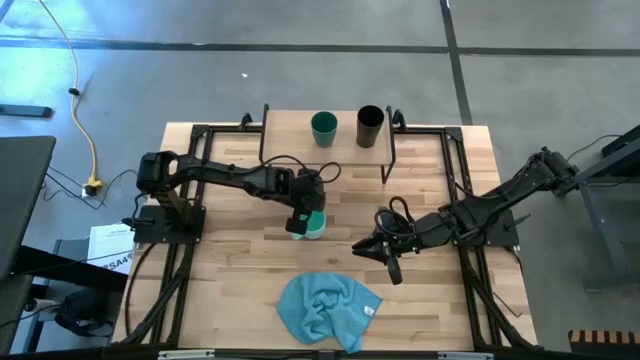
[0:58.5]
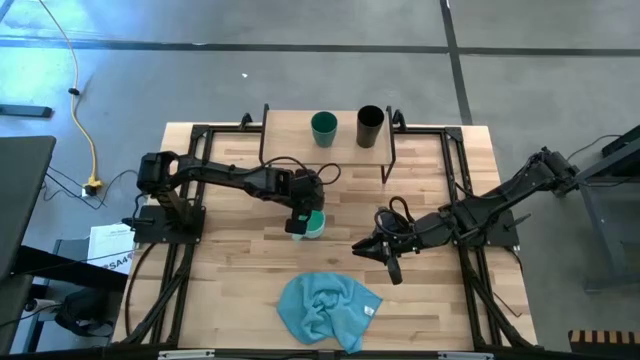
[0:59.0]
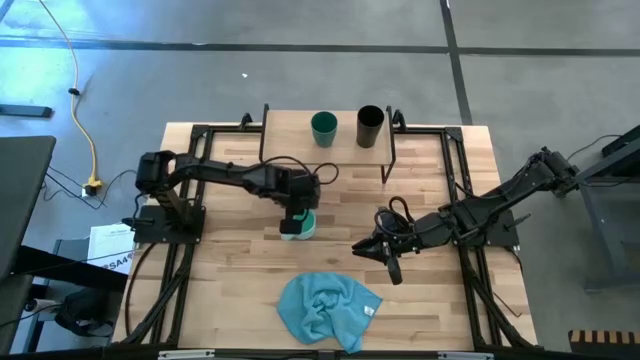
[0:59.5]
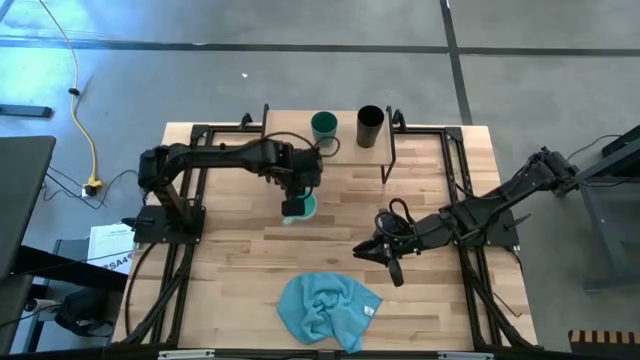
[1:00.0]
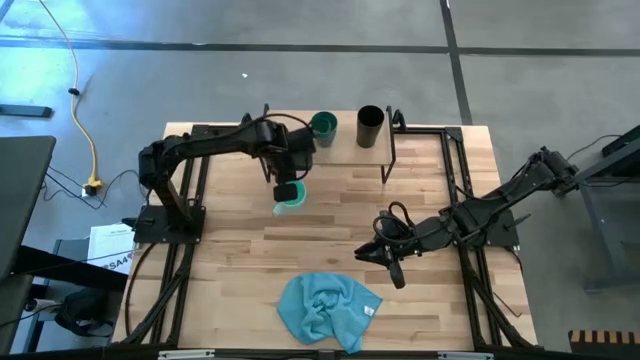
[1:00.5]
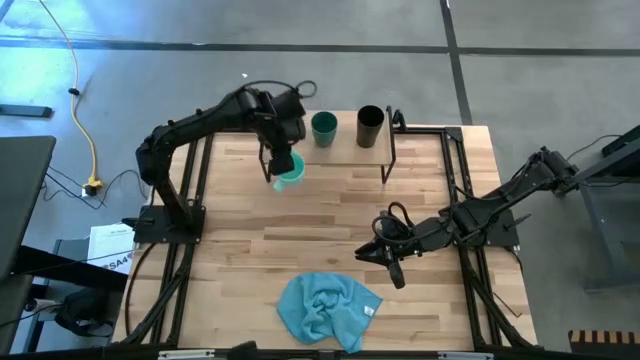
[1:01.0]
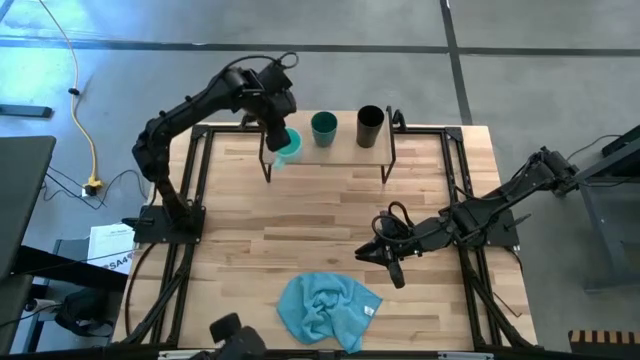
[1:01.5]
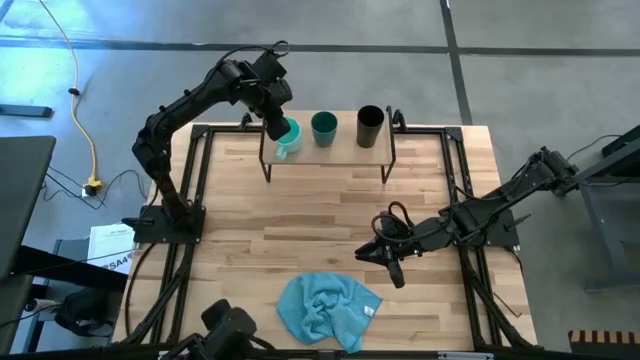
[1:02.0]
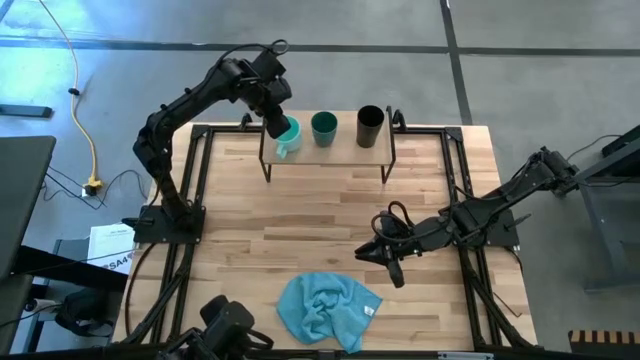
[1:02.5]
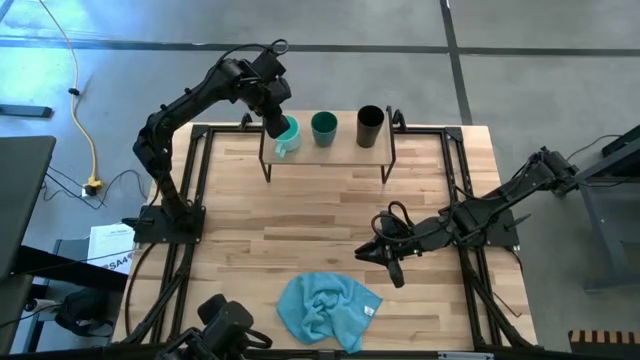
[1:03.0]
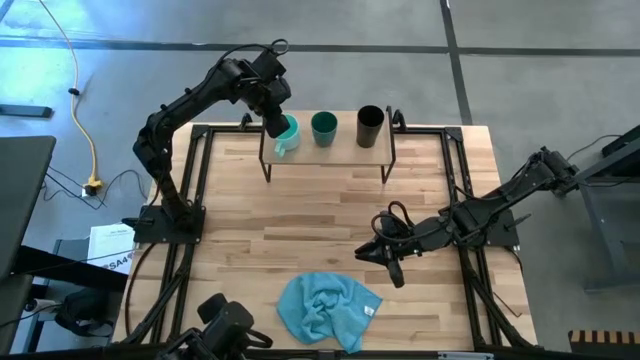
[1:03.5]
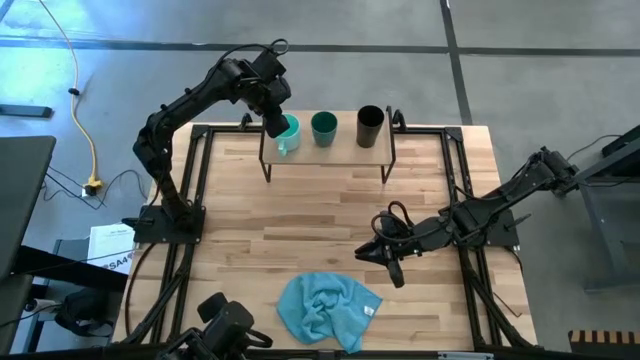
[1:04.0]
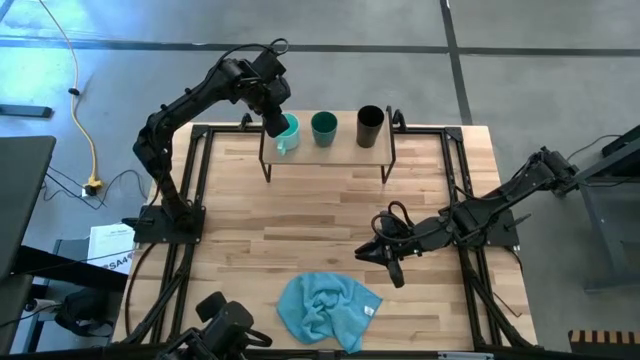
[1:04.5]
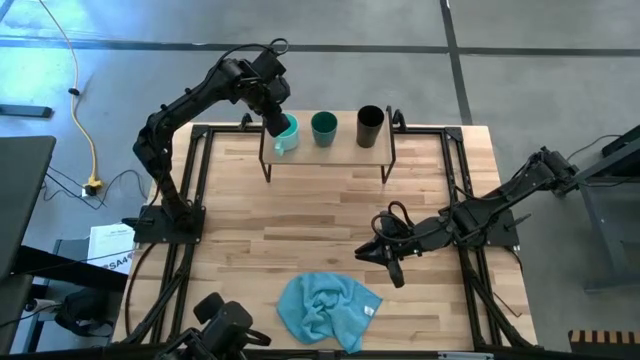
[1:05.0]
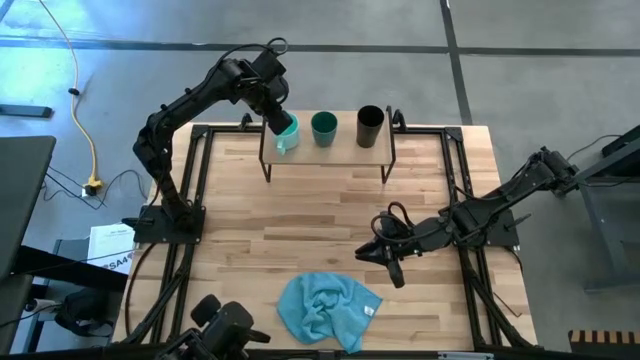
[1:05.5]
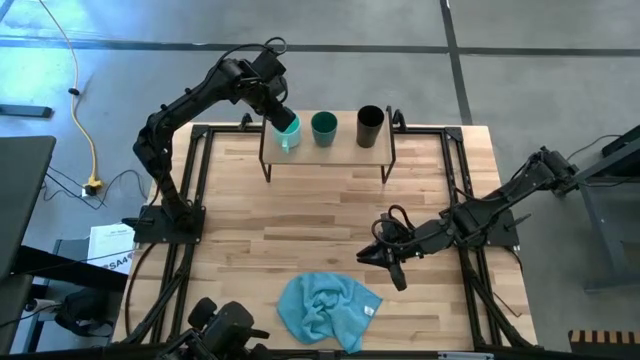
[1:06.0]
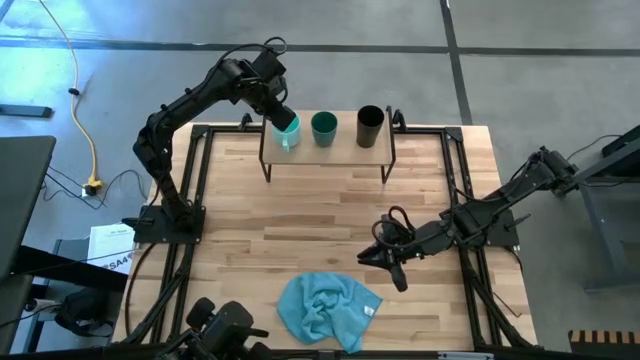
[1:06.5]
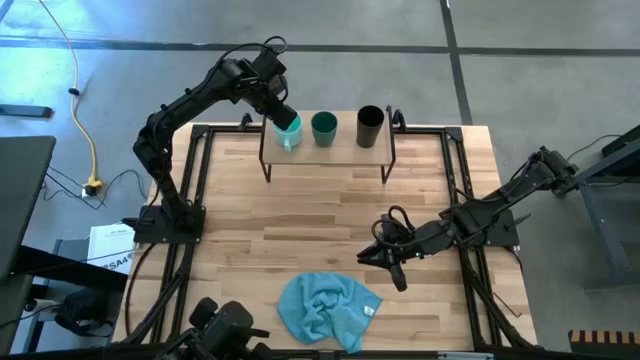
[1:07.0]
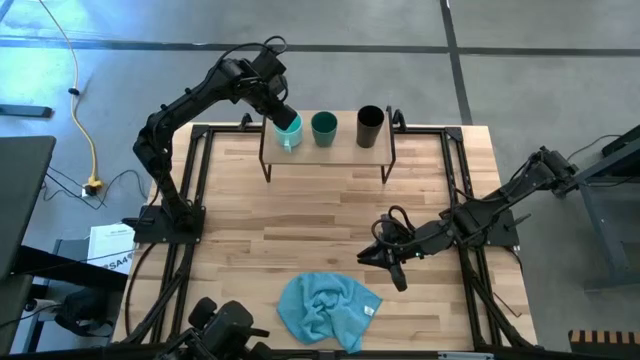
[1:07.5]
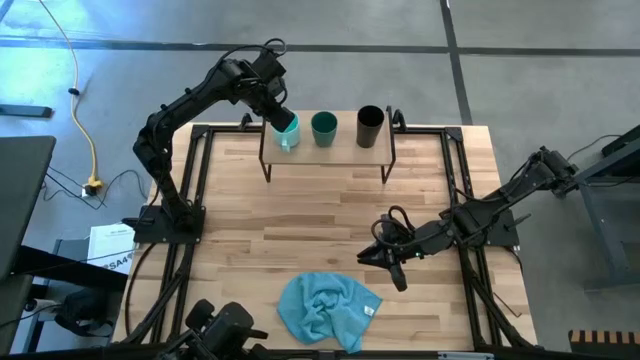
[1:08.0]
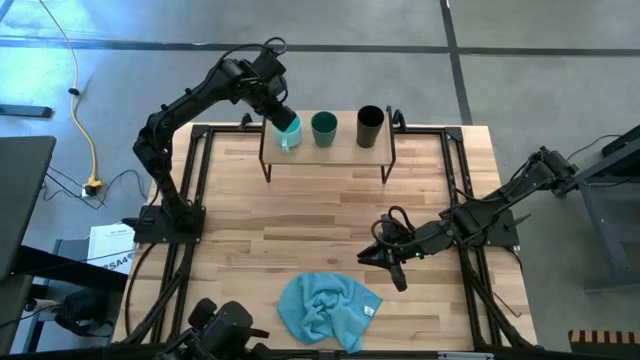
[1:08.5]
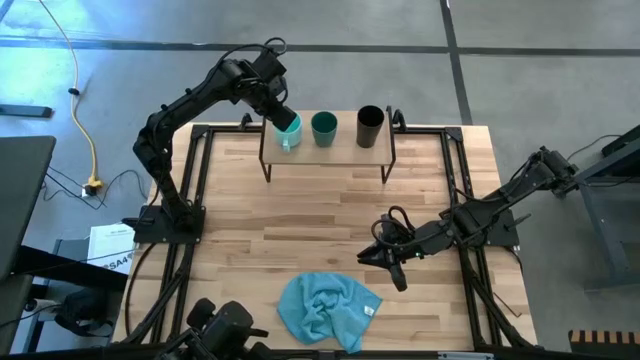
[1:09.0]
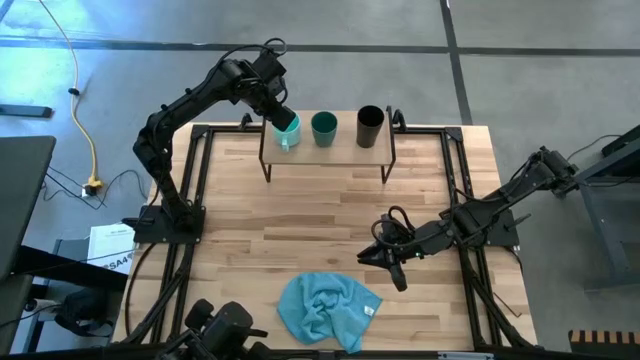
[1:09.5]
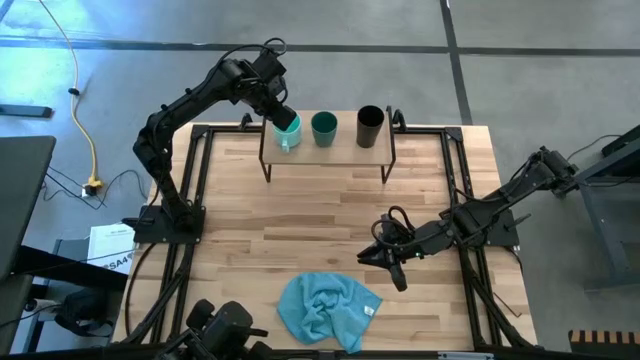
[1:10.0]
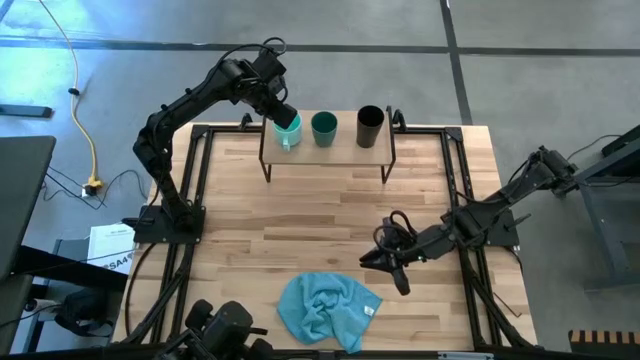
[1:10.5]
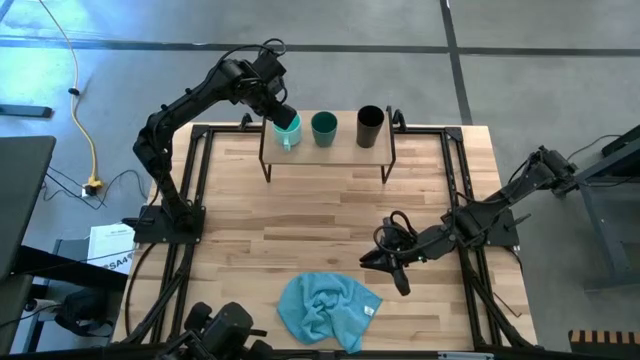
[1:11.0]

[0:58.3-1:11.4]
Task: Stack small to large cups/mugs on shelf
Put the blue mug on the shelf

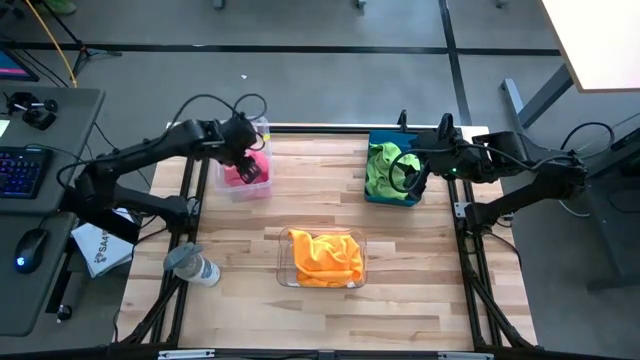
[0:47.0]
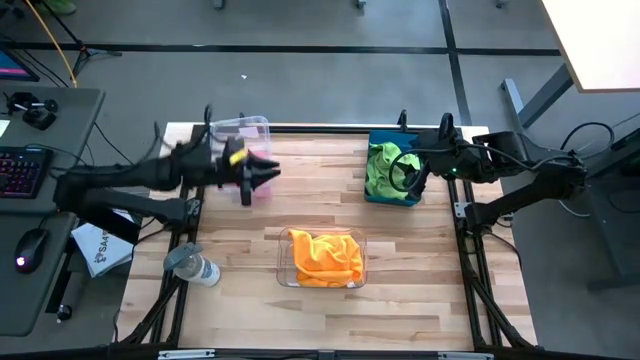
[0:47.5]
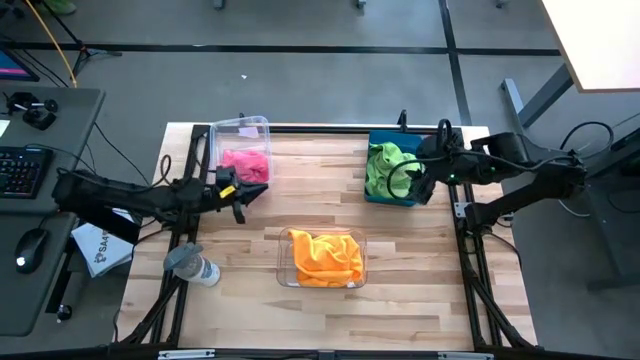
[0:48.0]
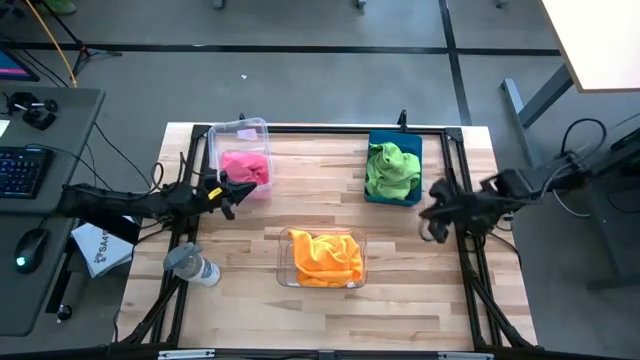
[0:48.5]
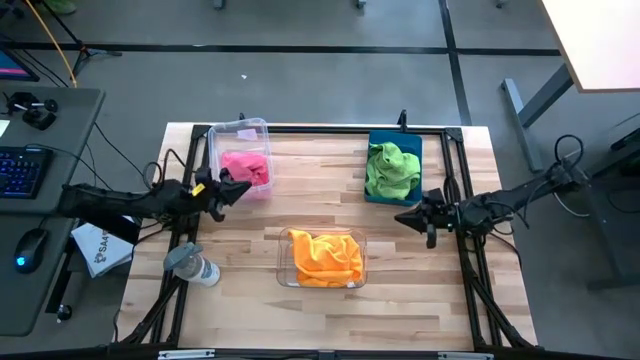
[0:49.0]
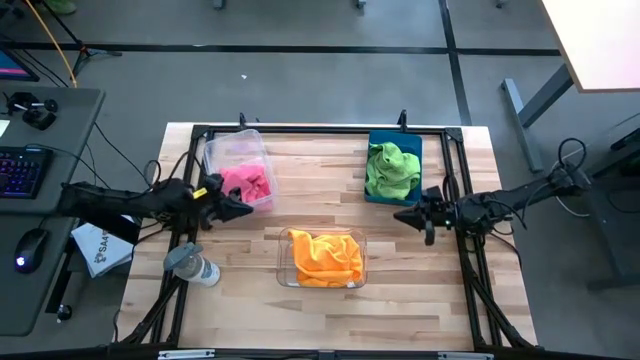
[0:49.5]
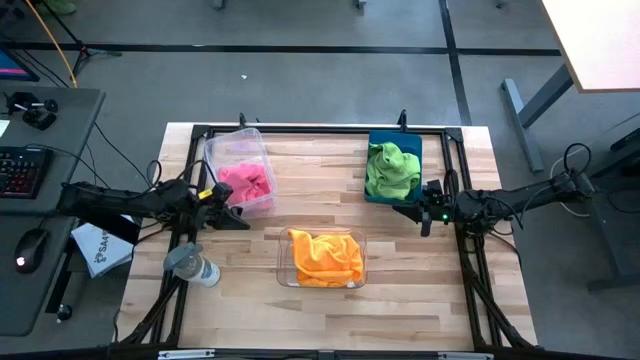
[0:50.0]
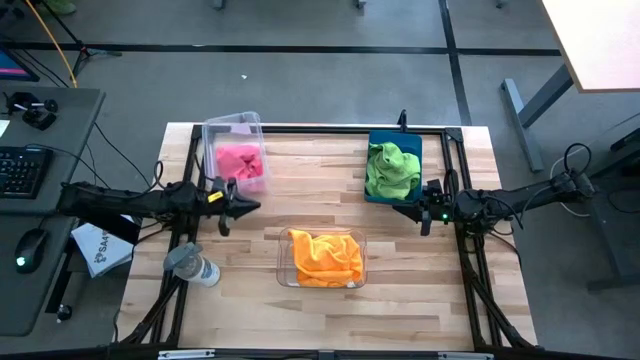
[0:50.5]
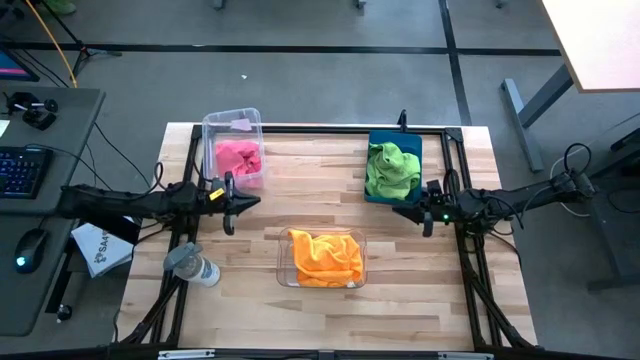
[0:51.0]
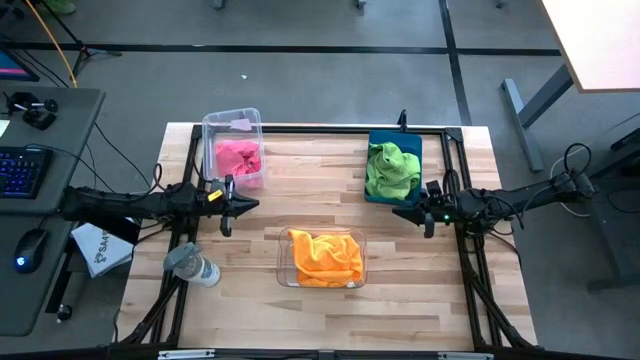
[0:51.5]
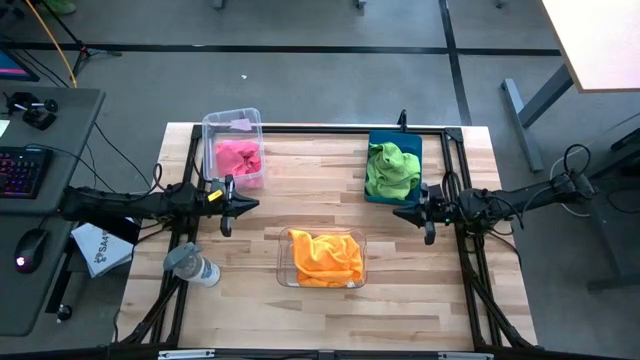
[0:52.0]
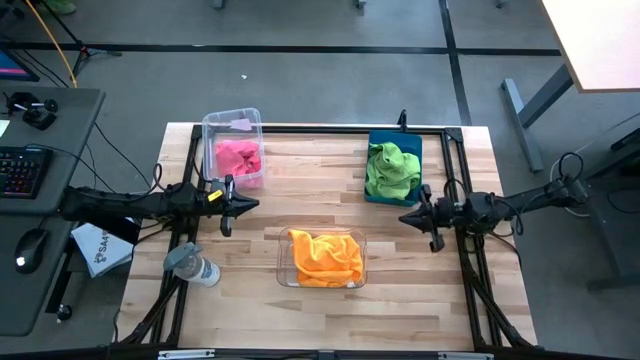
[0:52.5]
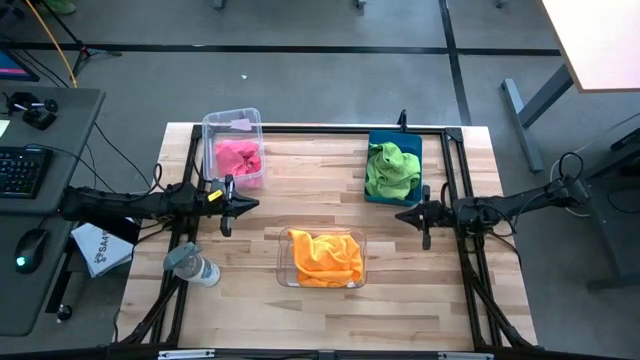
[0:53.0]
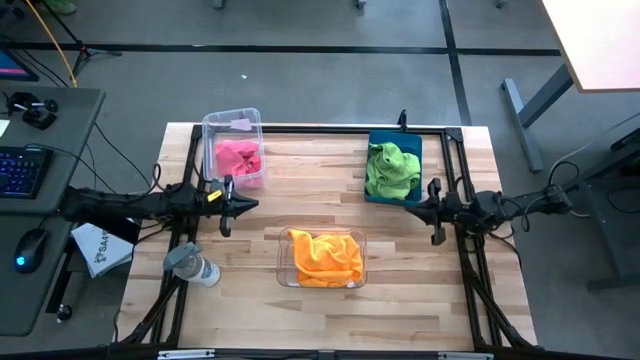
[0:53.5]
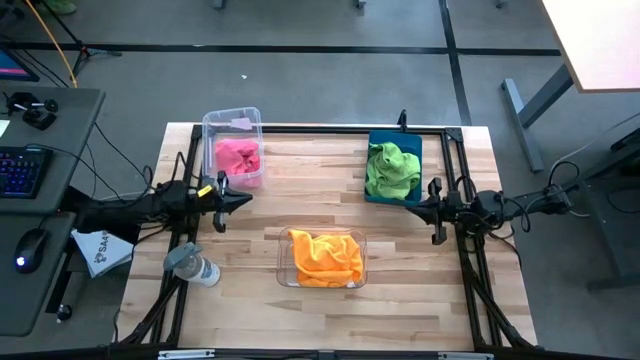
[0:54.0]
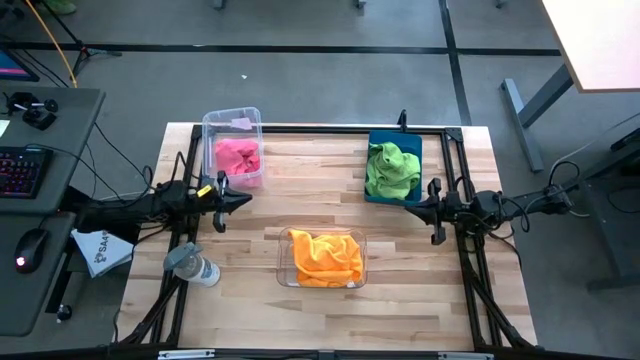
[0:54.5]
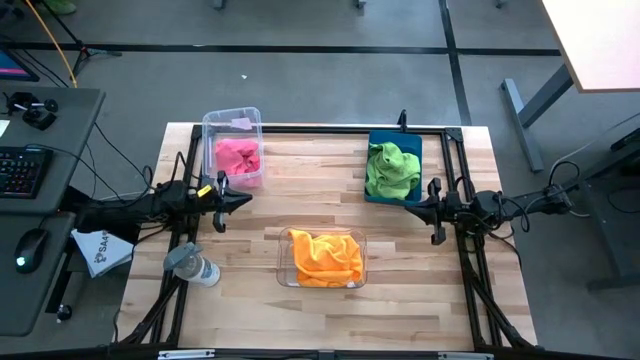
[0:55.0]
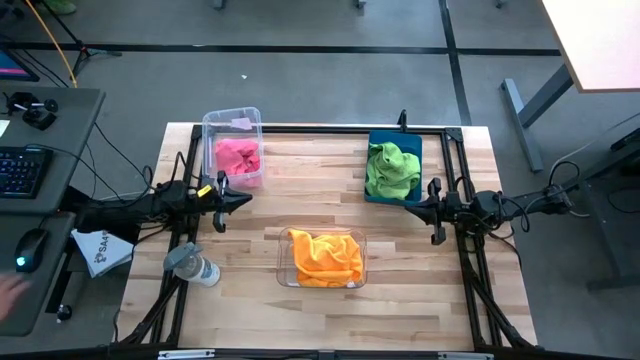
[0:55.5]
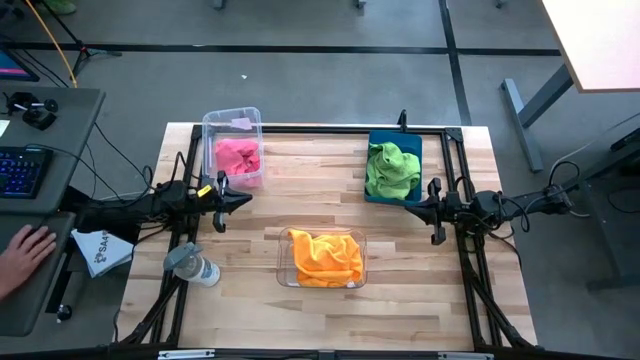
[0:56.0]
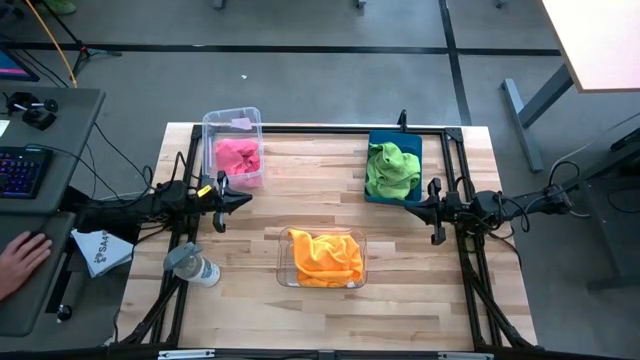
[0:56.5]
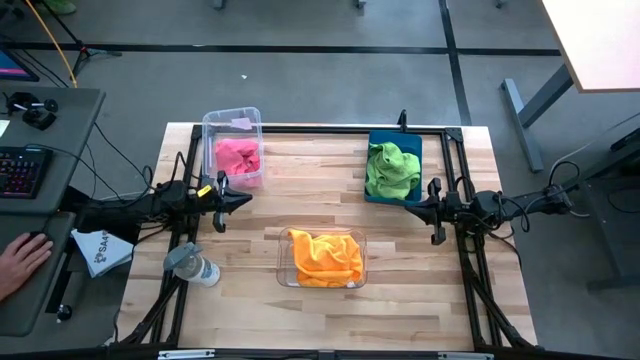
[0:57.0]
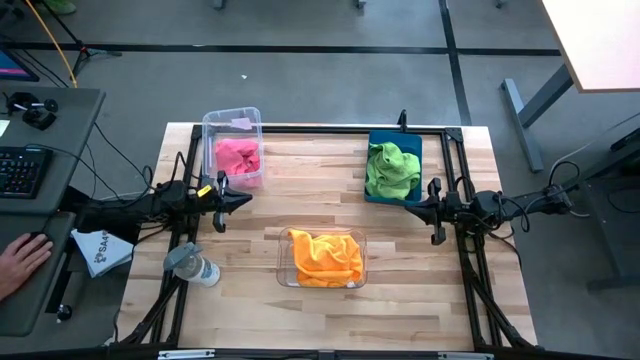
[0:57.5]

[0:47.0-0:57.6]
Task: Sort microfiber towel by color & place in baskets
Return to Home Position
